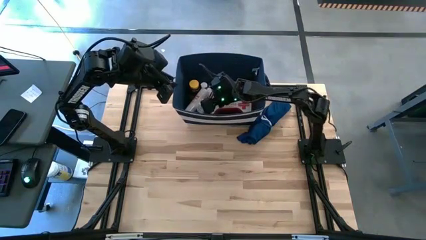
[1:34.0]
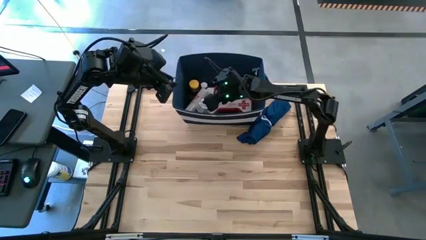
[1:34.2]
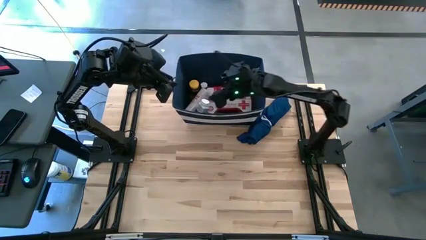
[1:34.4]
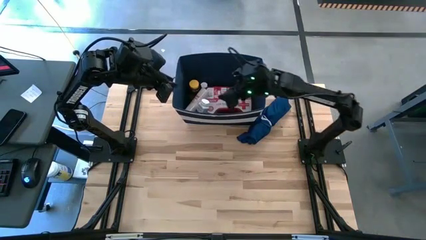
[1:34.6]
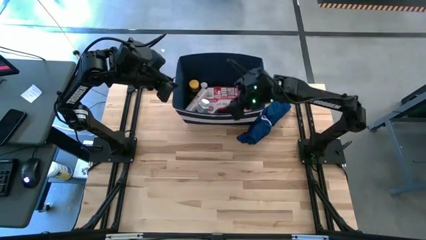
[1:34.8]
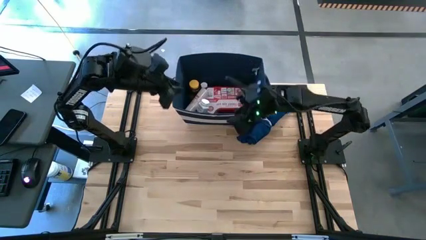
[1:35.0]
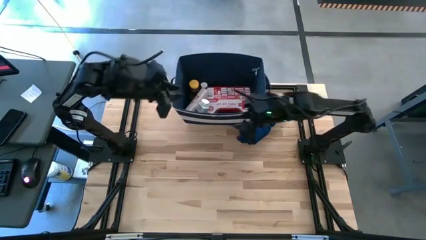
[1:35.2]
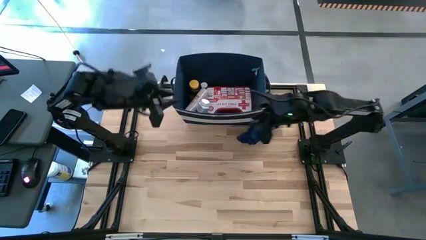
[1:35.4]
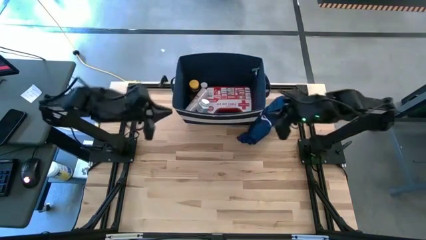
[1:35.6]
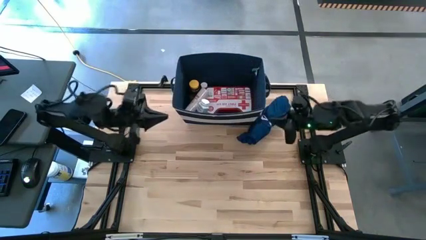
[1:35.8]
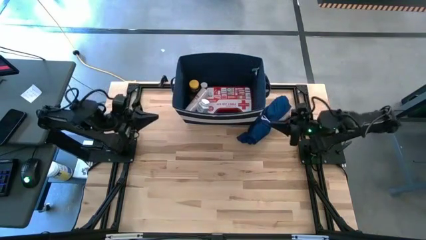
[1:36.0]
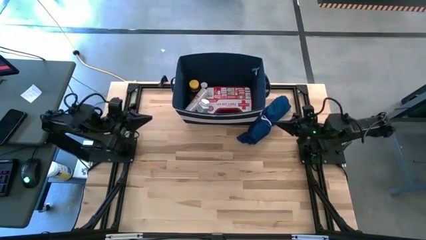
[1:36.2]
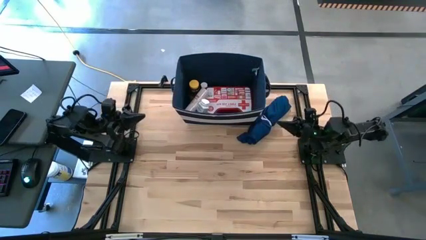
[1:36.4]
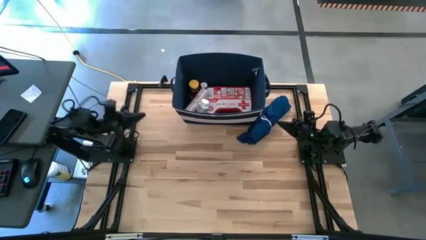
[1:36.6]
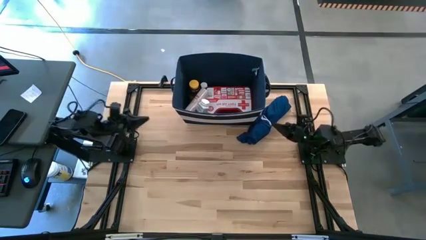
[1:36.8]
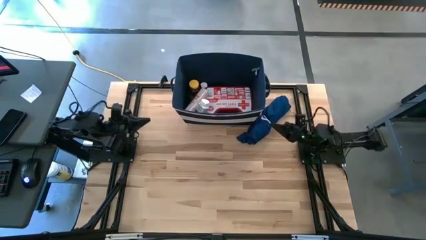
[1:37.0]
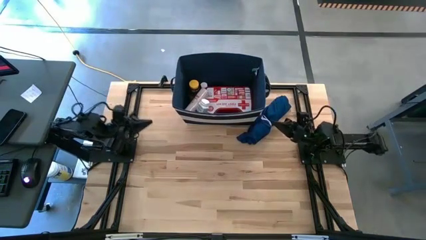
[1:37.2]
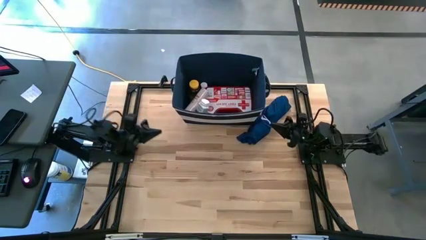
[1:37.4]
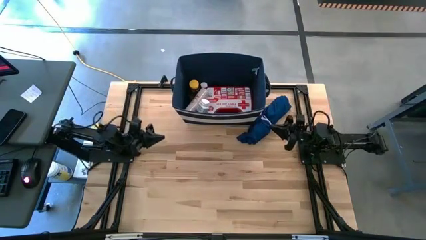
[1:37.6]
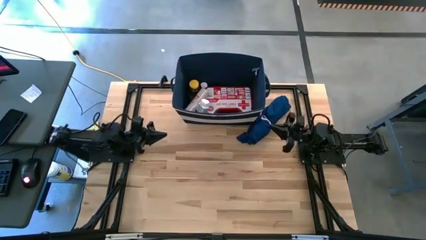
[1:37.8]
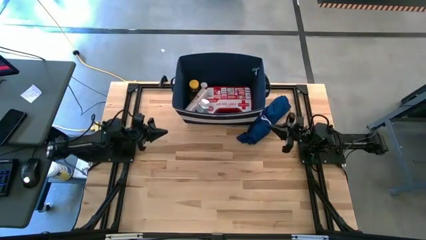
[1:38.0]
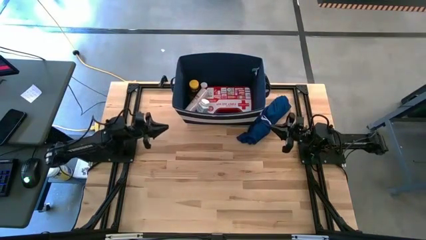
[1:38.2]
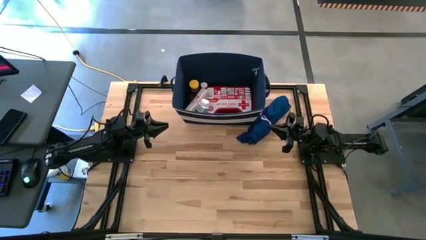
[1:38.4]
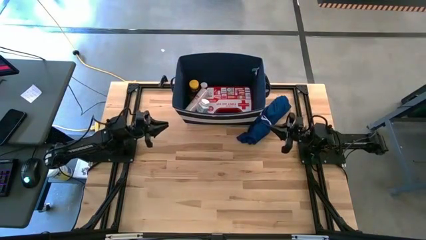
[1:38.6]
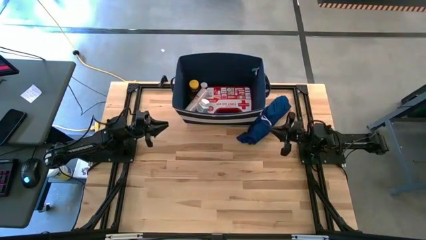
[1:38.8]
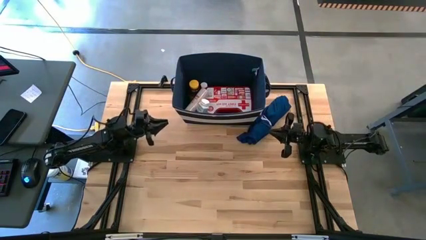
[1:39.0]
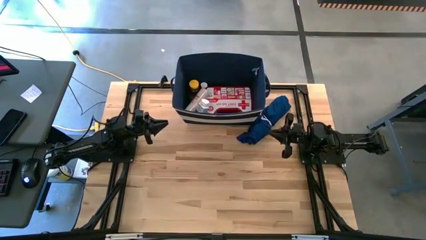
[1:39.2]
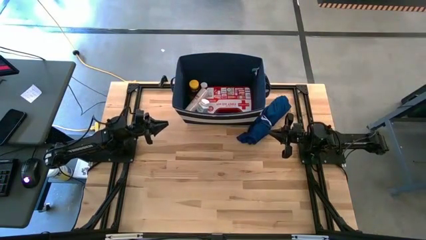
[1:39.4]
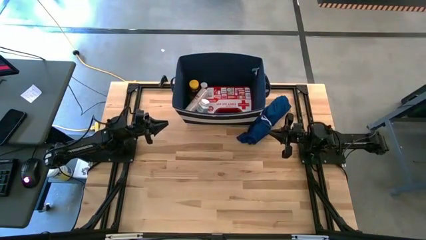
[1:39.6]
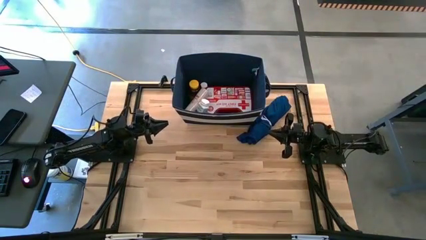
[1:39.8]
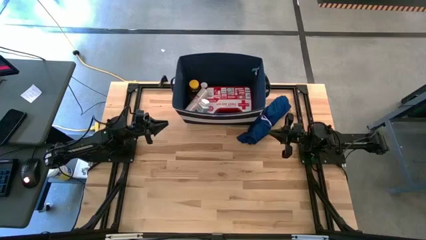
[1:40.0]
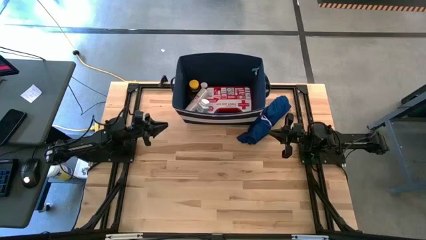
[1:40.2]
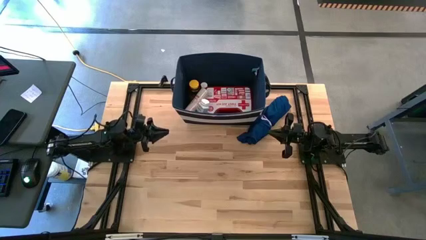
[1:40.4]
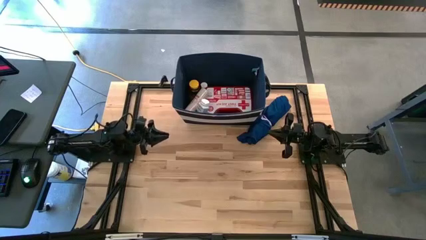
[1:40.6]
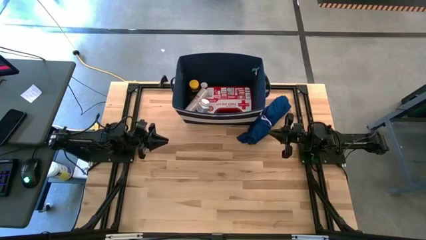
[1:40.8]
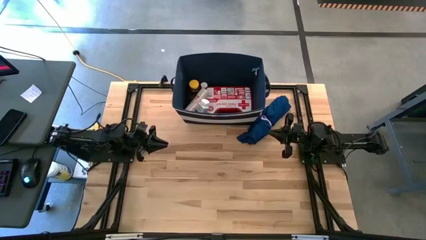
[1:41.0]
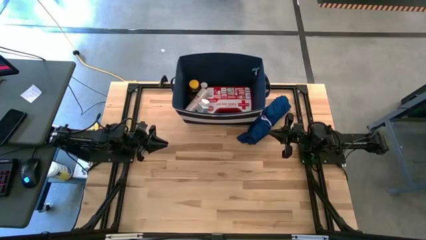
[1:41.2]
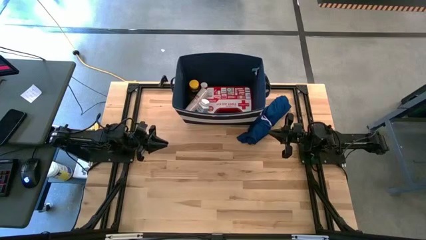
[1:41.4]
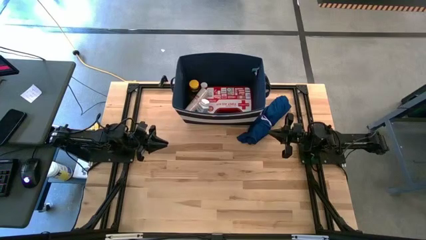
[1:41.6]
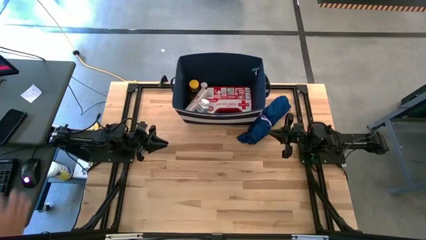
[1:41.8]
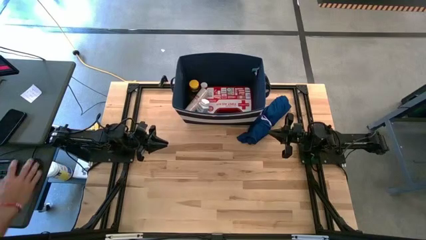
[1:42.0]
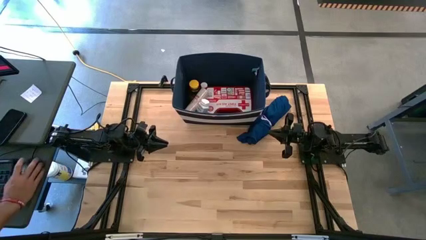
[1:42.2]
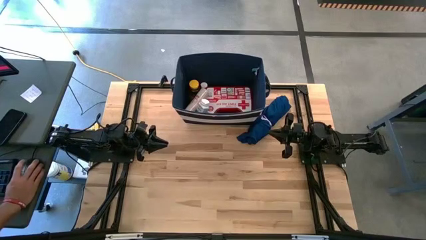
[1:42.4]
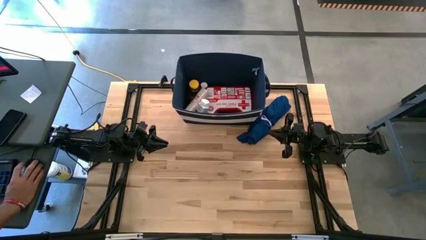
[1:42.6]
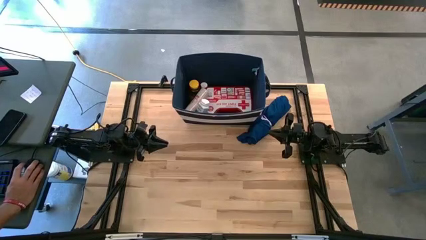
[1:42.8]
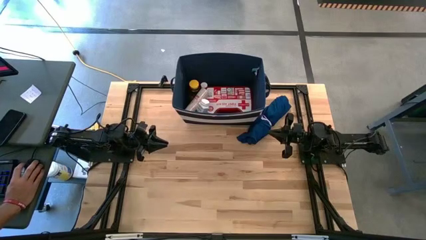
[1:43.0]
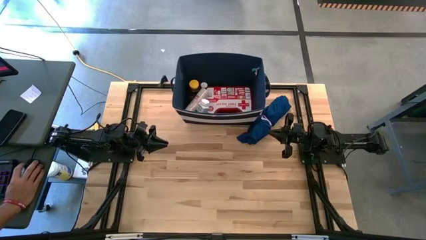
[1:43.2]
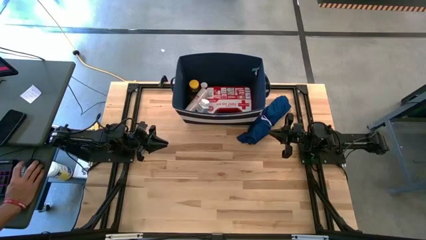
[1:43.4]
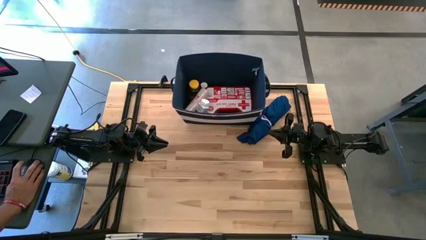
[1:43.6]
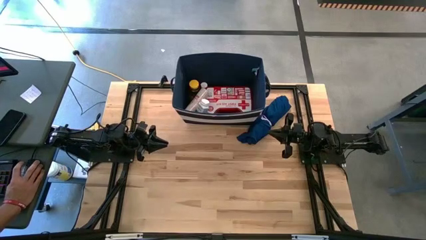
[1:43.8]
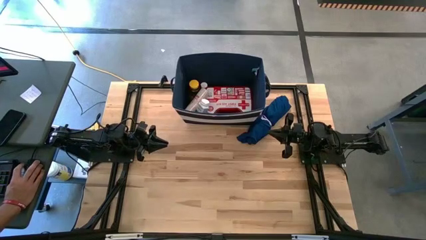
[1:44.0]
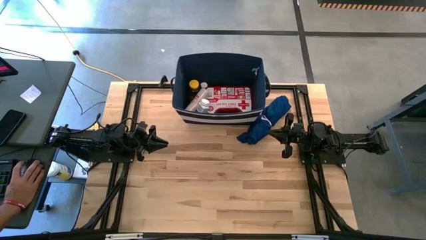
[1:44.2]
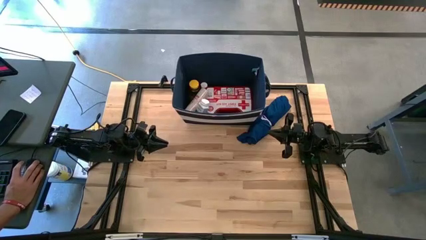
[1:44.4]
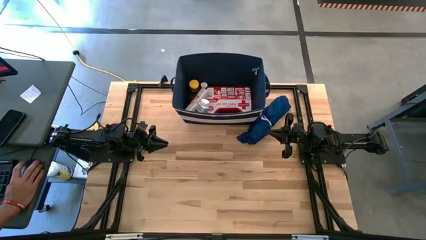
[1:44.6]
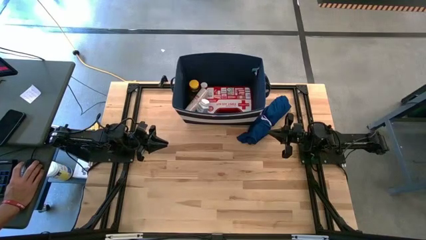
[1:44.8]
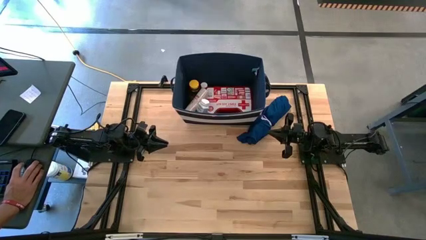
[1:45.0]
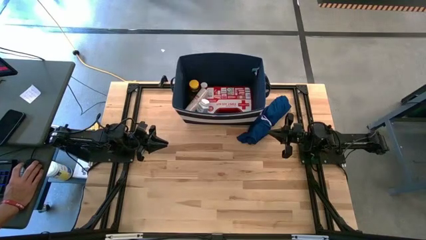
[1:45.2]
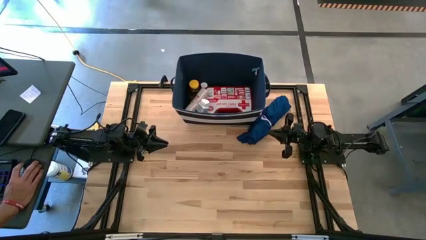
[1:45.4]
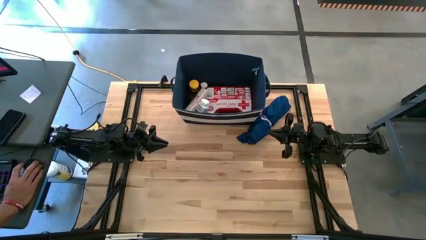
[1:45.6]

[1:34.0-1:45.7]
Task: Pick & place medical supplies in basket/bin
Return to Home Position

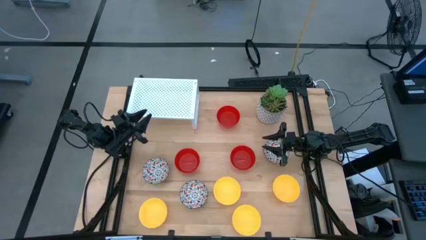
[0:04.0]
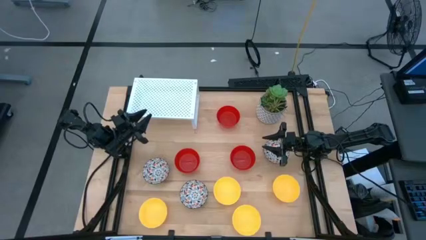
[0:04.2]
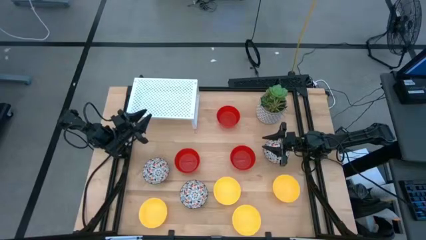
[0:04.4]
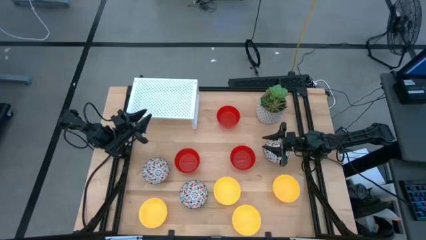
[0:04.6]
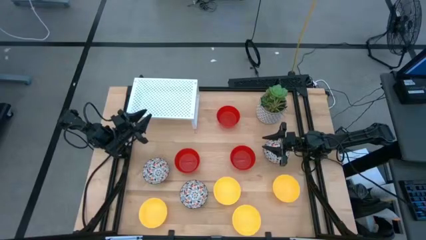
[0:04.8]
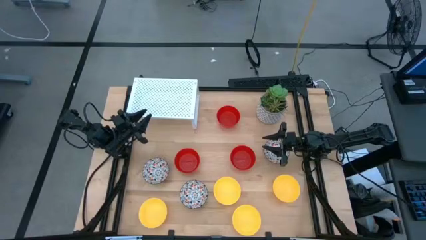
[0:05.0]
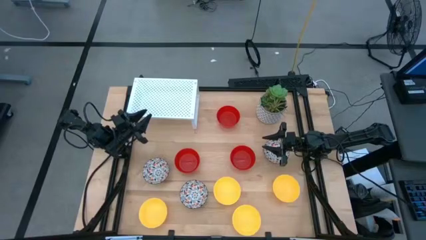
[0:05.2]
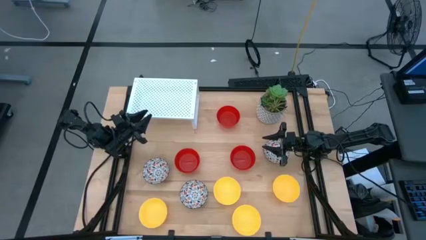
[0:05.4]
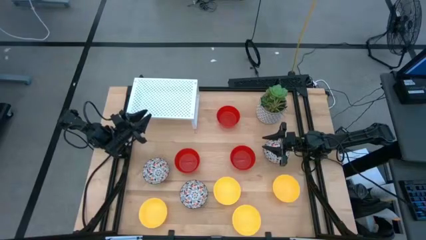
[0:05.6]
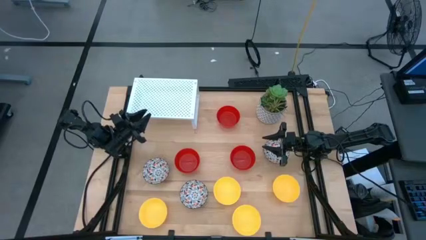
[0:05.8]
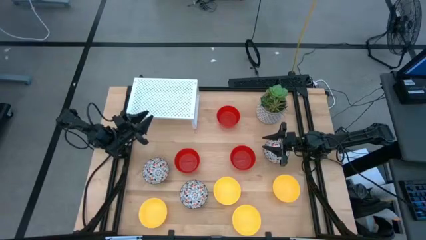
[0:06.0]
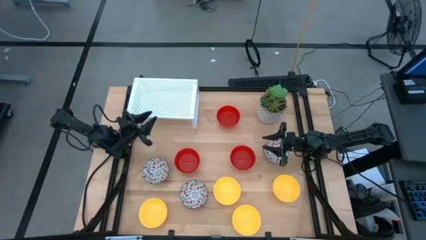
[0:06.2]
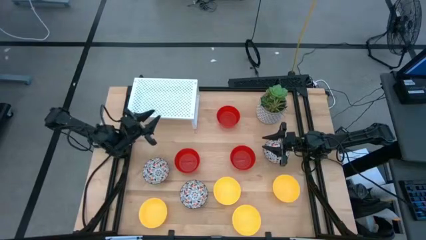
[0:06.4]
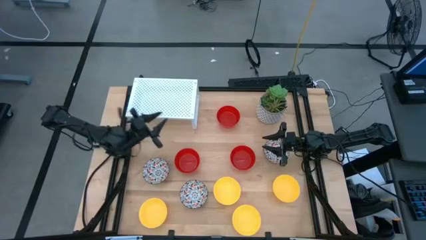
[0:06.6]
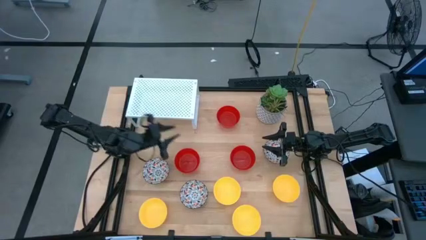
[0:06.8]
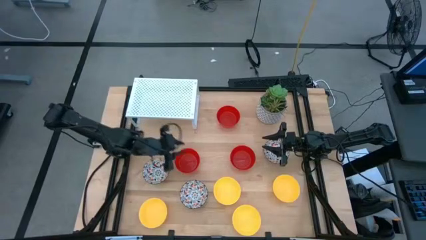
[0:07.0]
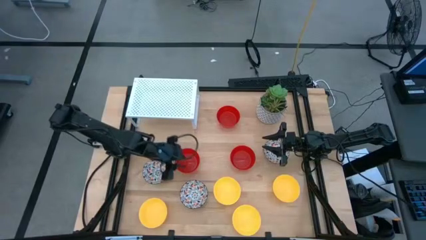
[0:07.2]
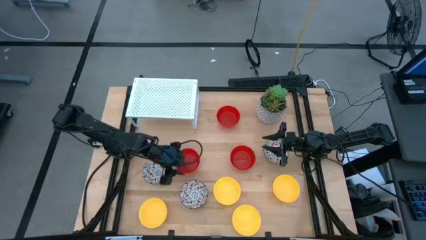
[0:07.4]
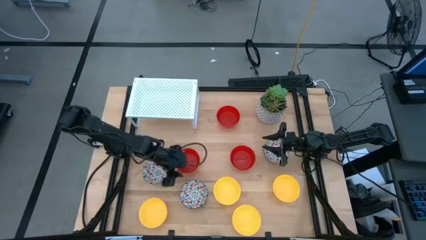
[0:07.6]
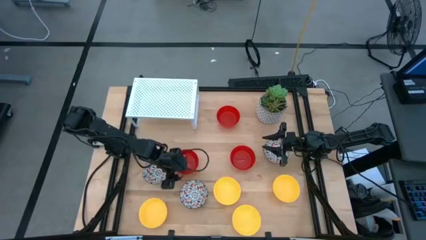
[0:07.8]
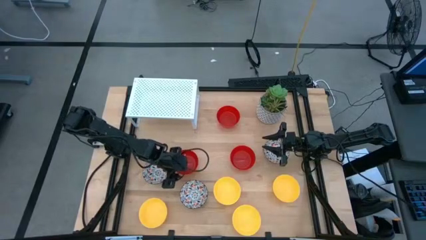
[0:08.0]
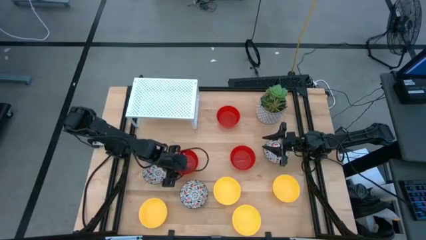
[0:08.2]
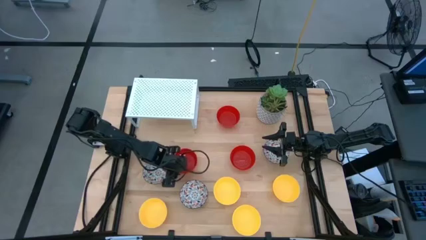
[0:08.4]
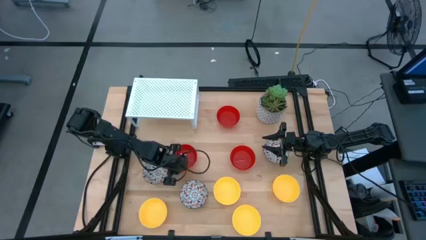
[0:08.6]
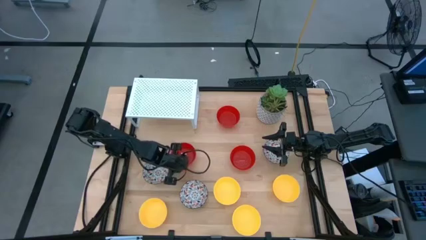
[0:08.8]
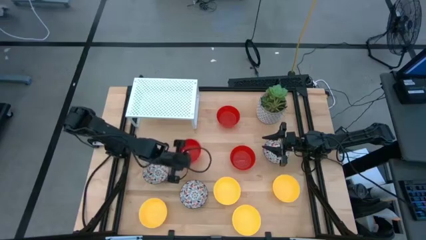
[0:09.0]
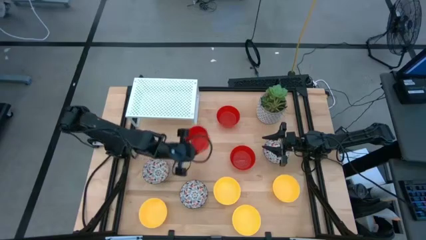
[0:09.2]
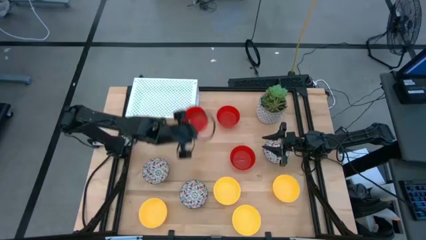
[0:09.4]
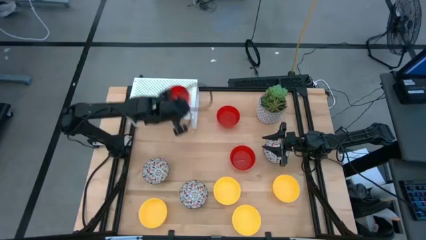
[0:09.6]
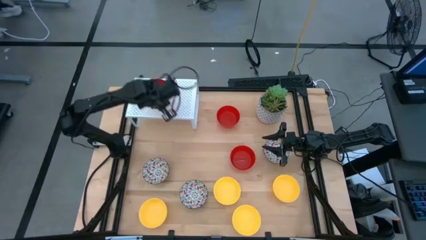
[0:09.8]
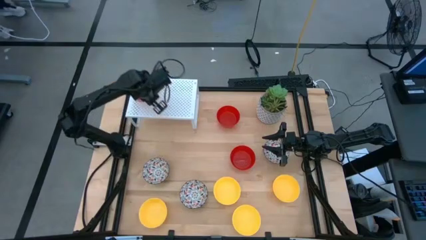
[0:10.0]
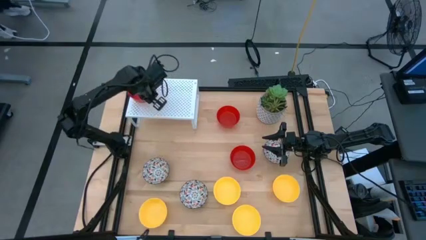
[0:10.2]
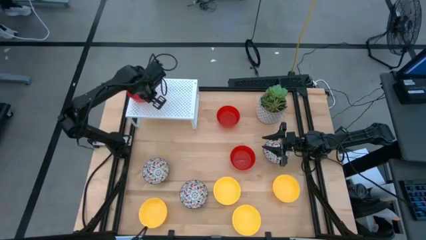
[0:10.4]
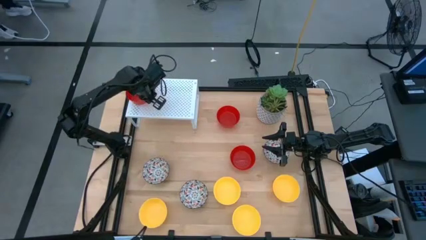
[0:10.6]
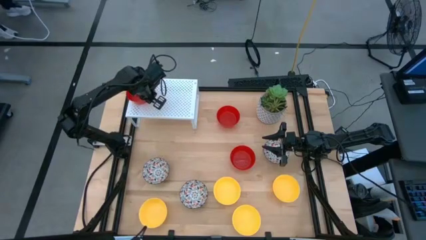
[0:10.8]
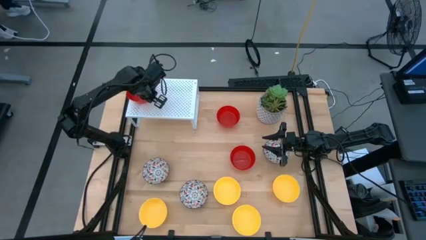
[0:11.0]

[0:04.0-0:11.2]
Task: Pick & Place Mini bowls
Put the red bowl on the shelf
